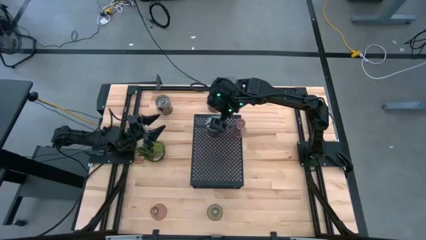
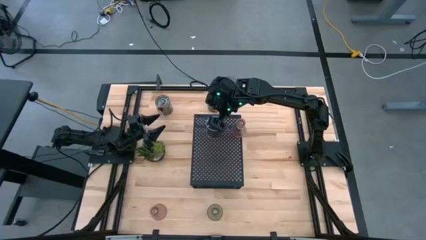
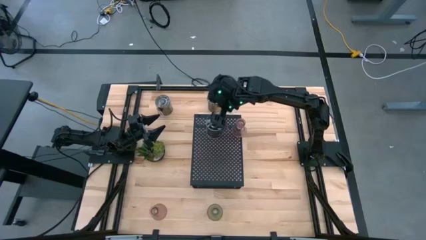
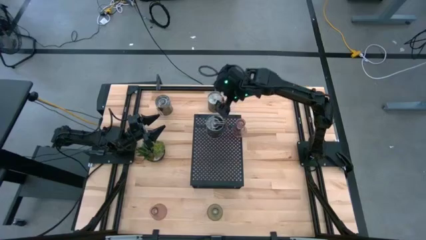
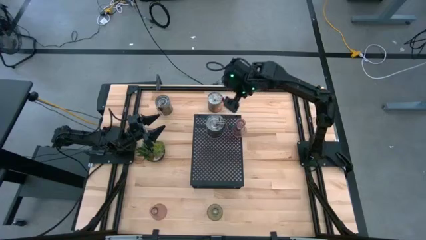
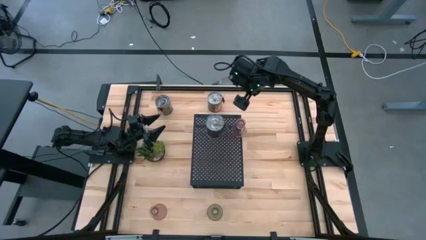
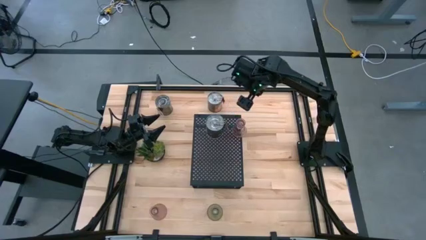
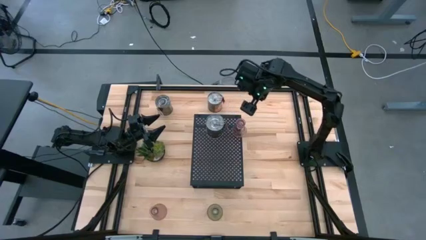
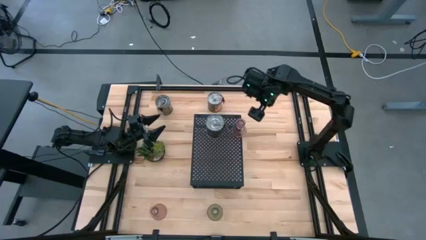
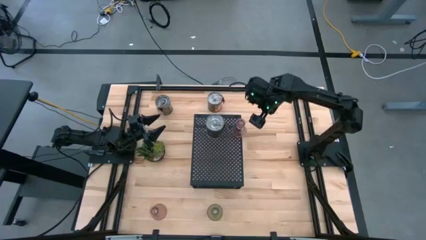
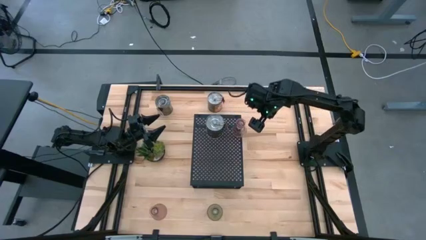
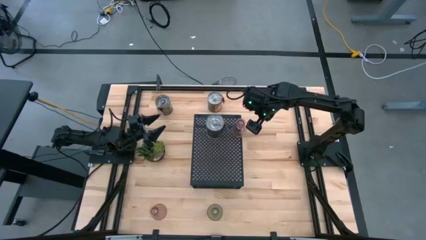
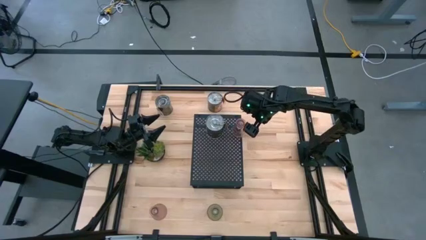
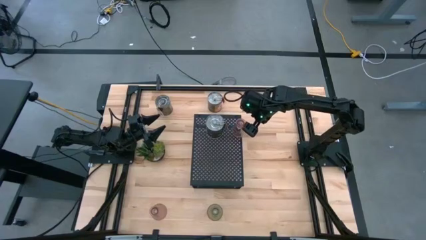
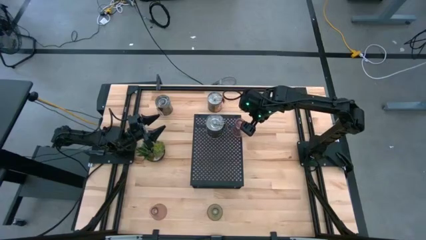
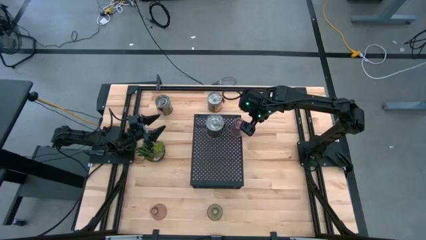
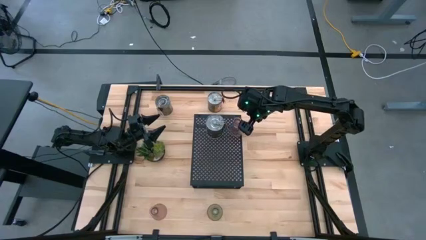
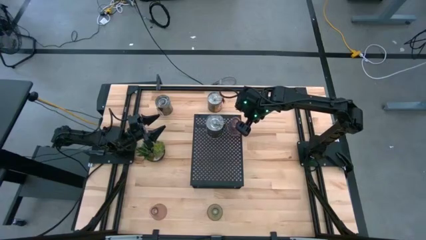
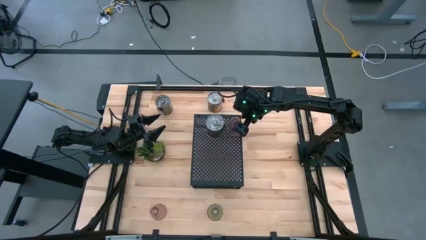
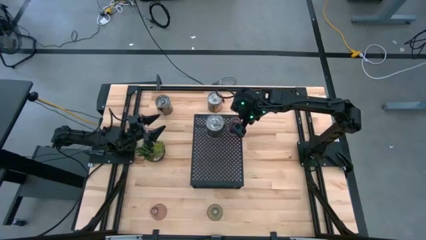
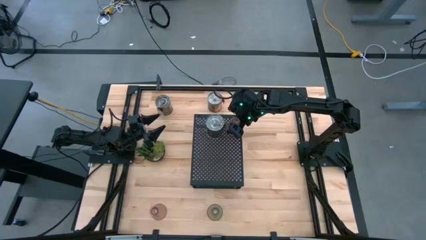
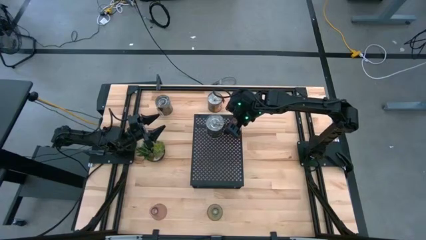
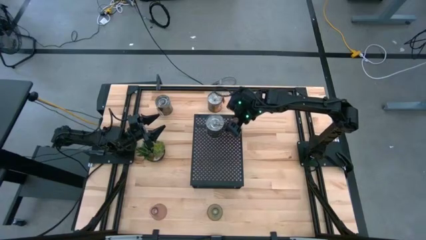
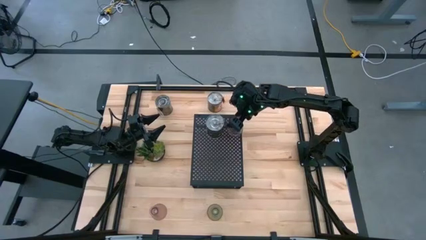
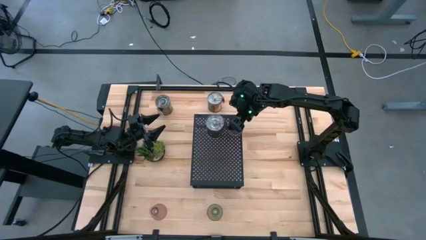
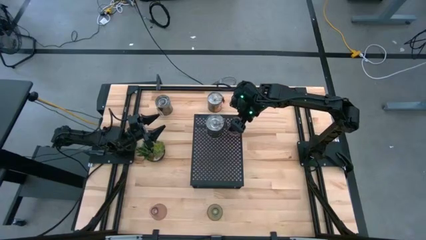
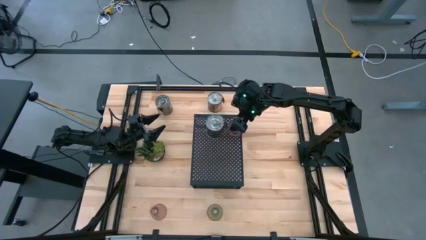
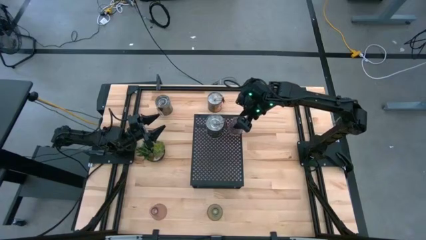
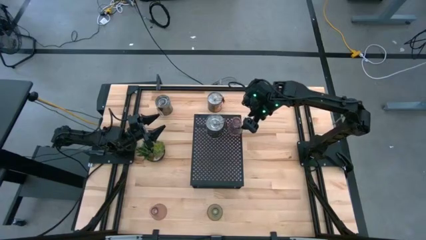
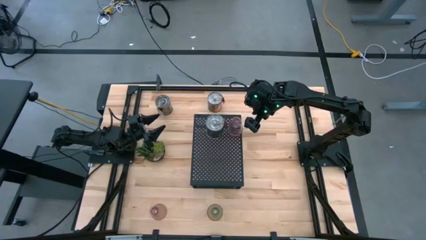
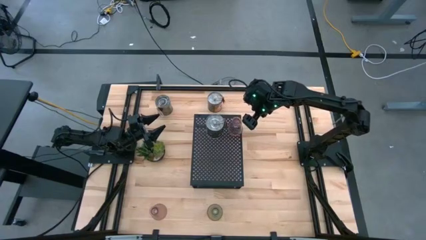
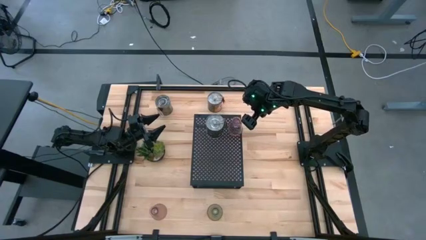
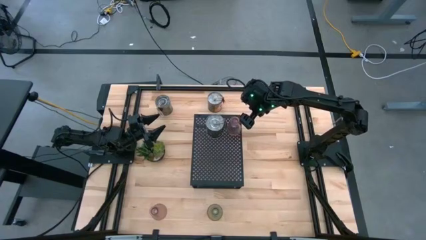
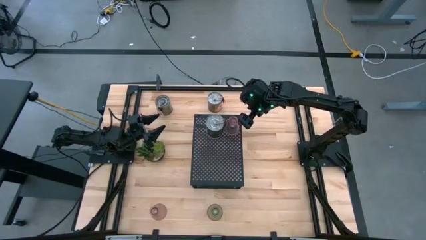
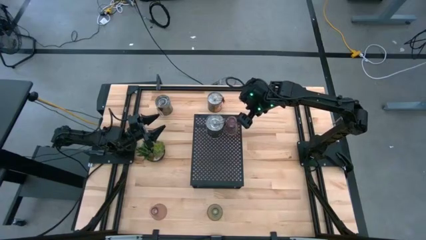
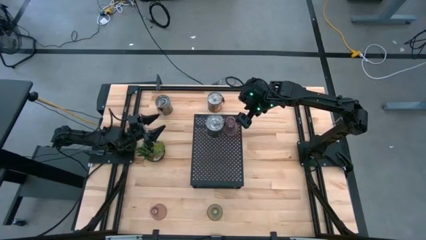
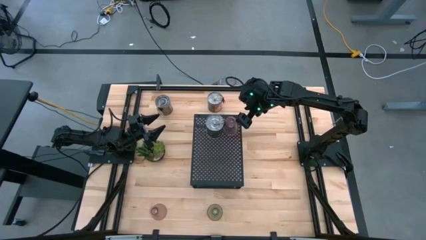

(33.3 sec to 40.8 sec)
Task: Pick & Place candle stick holders
Adjust the pink glass candle holder on the shelf

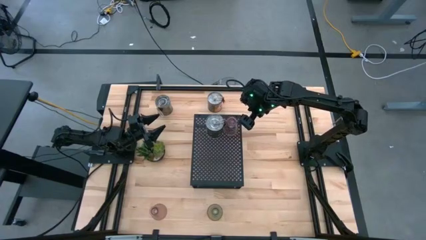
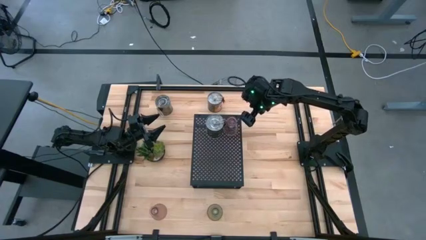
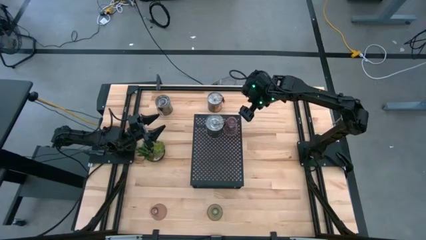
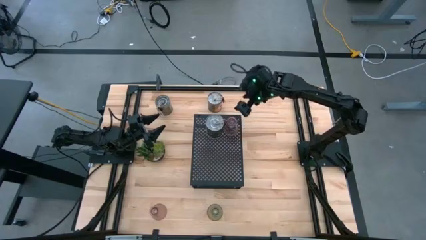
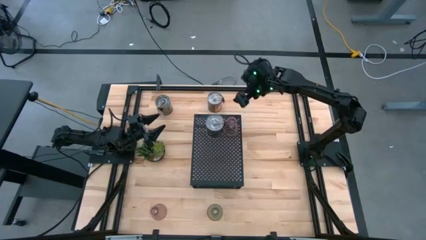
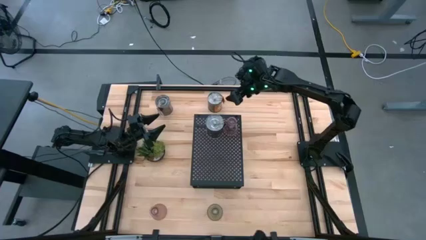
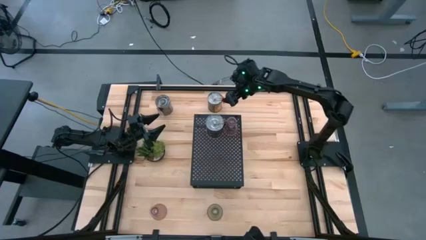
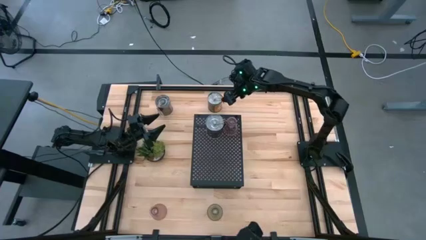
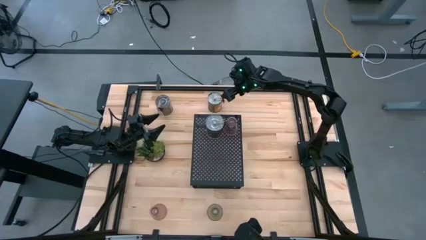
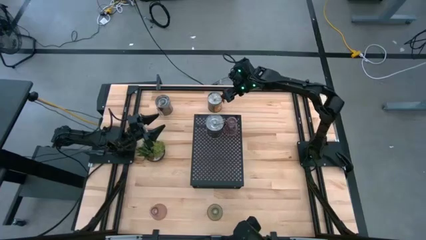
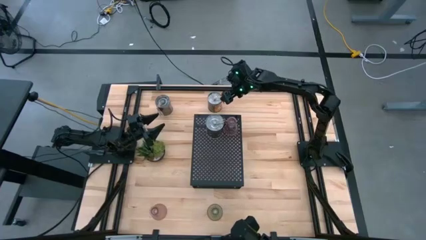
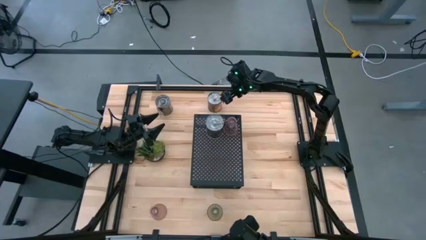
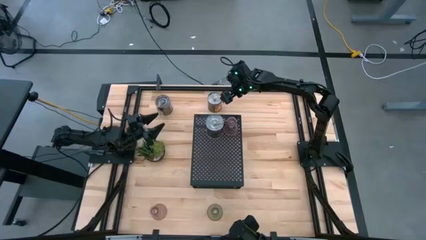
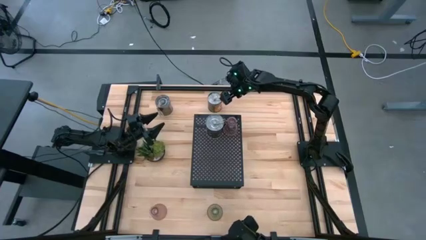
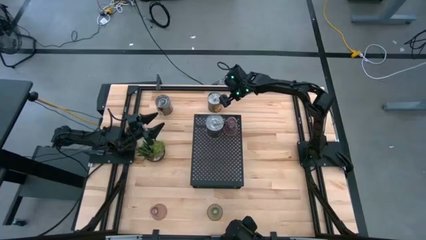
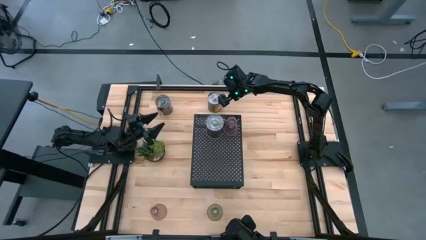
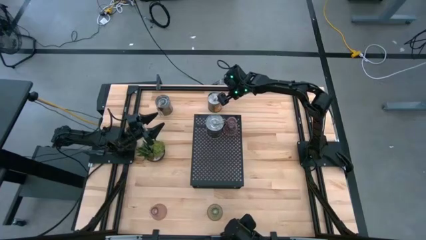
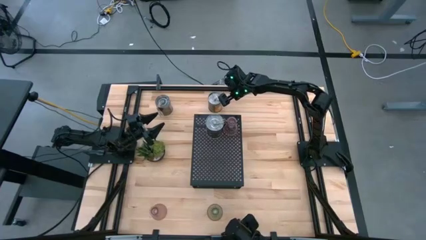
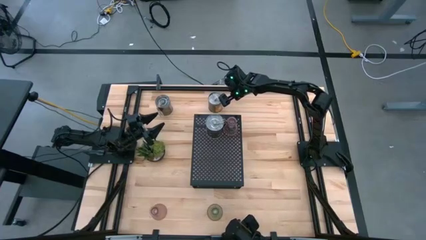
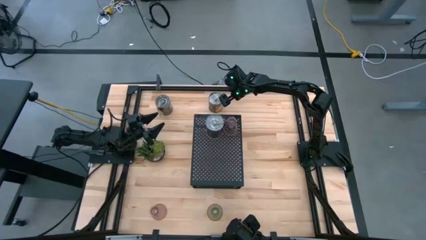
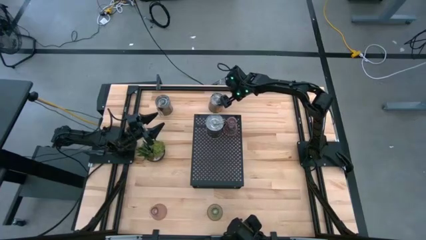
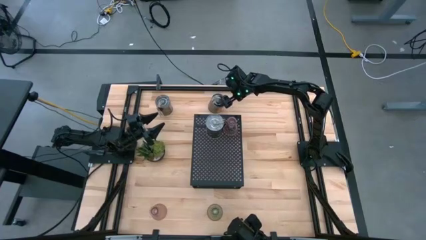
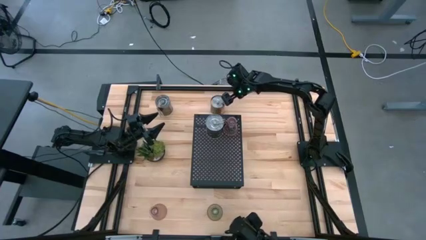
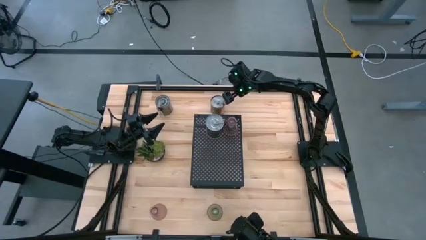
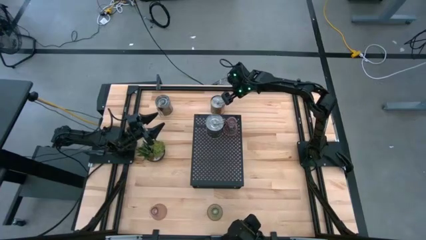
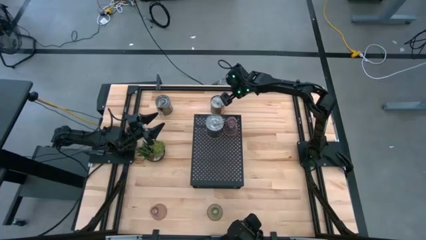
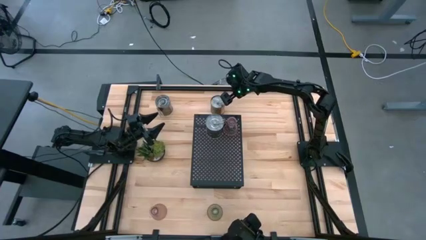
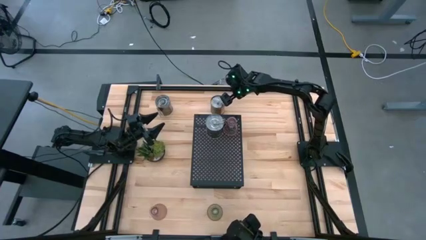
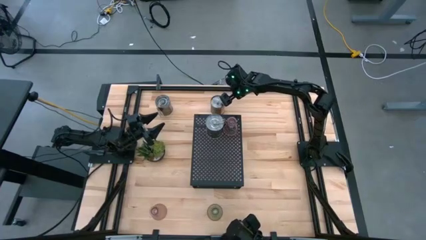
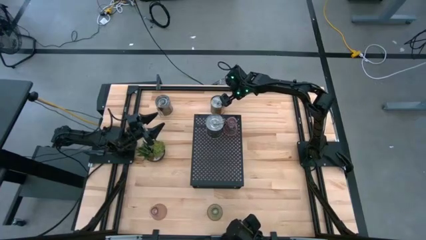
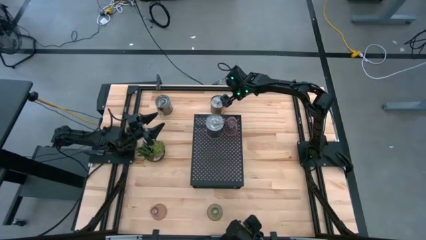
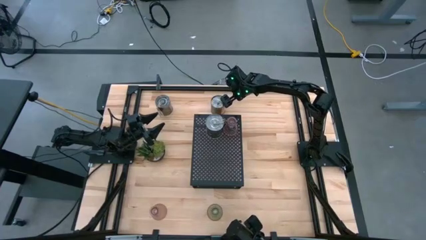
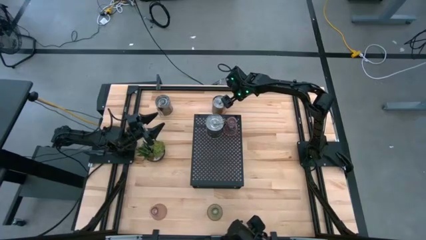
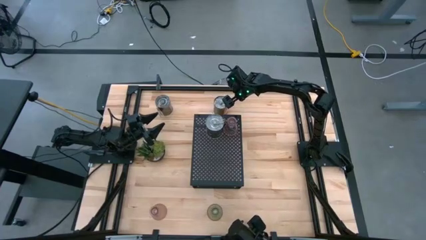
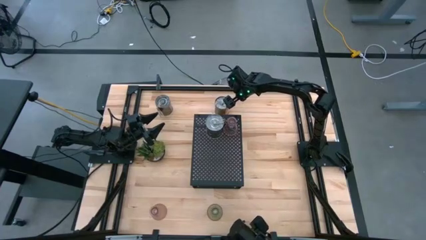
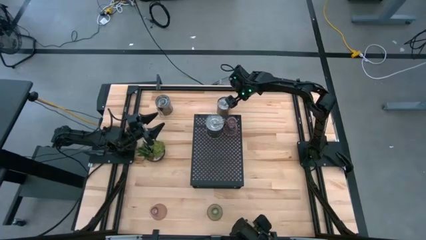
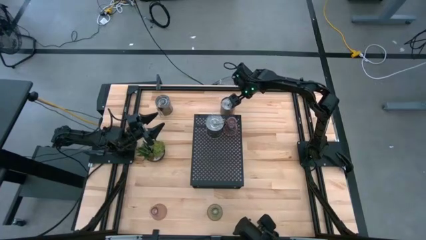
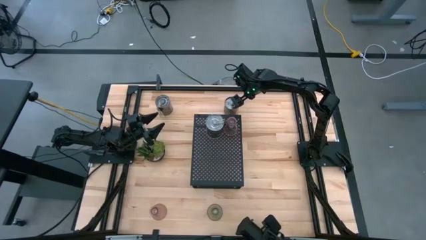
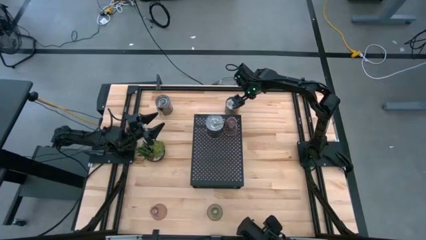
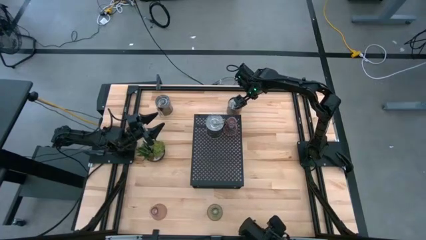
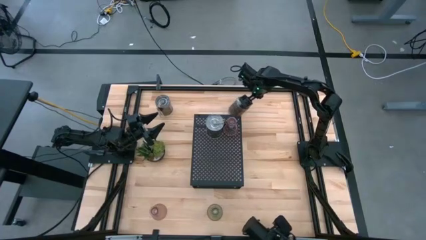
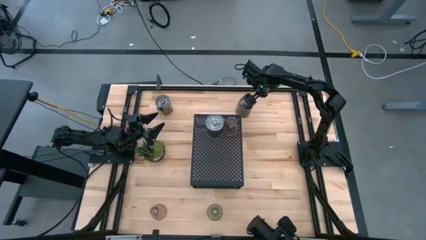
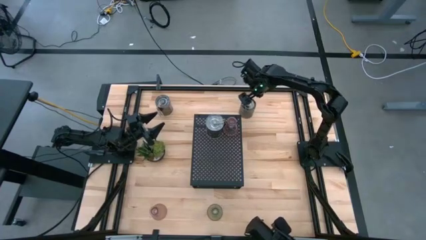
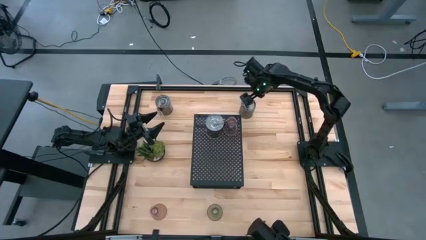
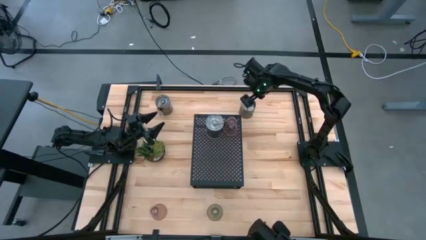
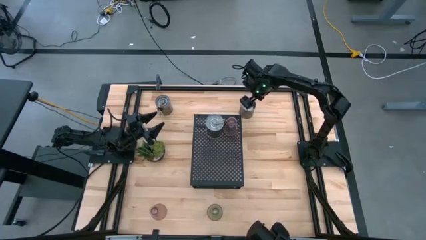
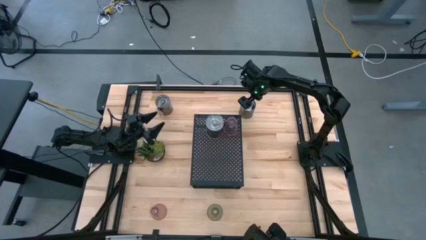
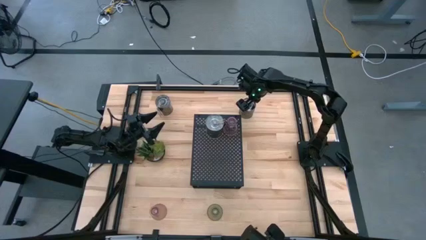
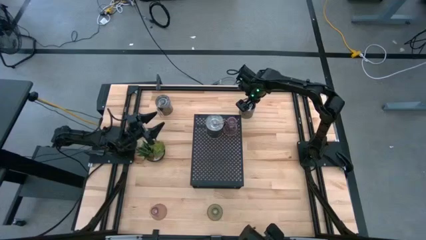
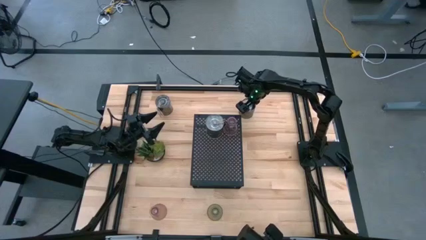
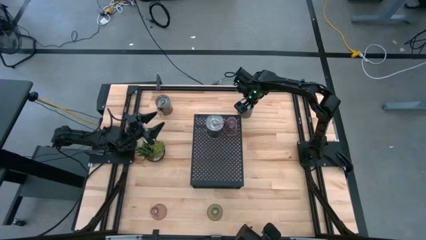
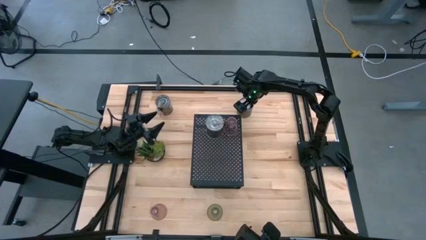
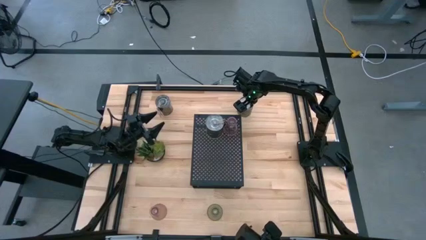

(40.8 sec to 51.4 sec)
Put the right silver scented candle on the shelf aligned with the silver scented candle
